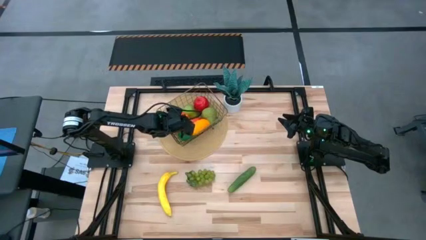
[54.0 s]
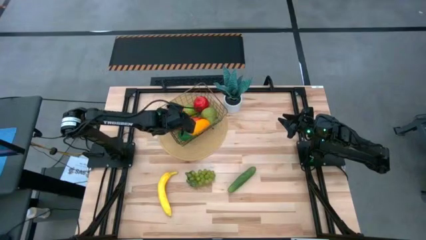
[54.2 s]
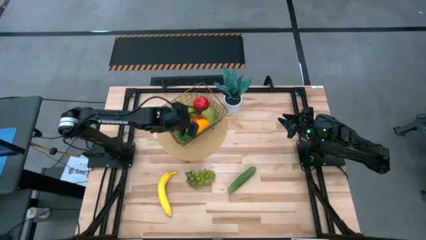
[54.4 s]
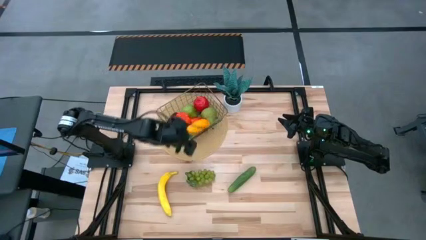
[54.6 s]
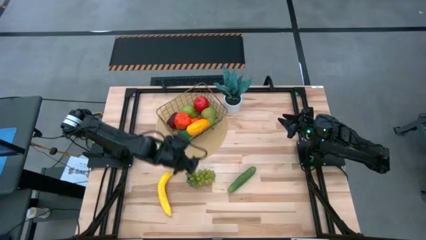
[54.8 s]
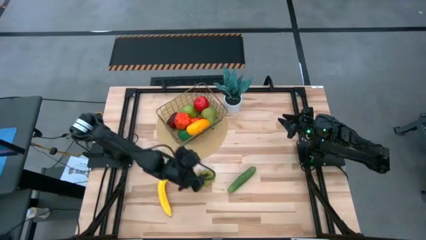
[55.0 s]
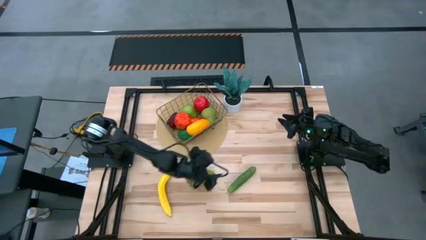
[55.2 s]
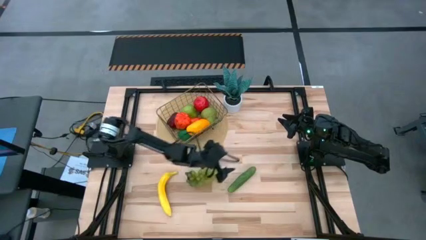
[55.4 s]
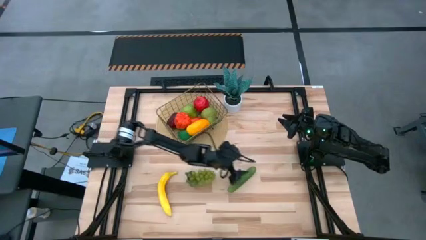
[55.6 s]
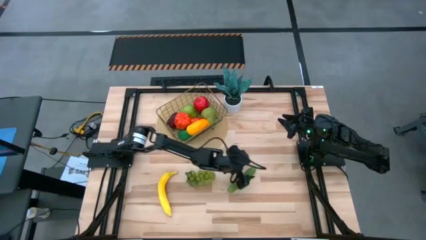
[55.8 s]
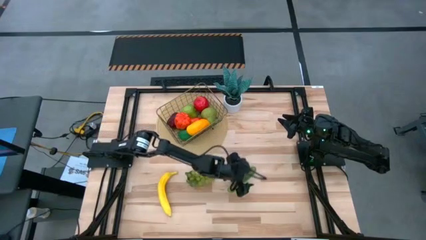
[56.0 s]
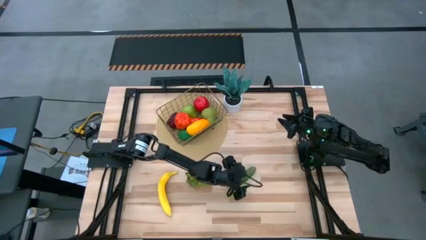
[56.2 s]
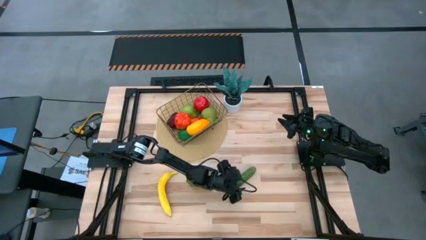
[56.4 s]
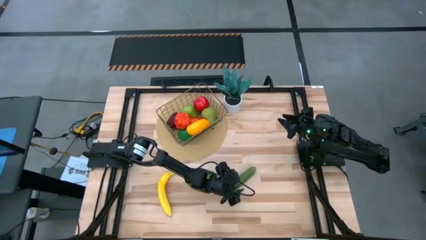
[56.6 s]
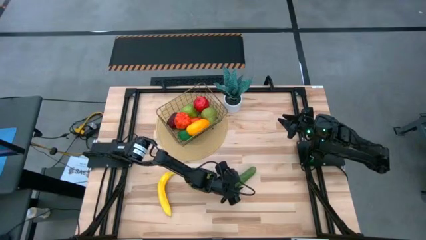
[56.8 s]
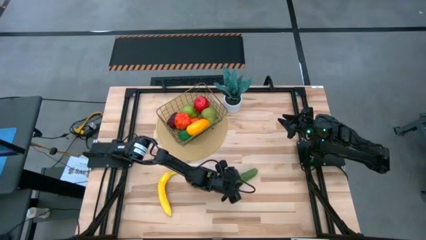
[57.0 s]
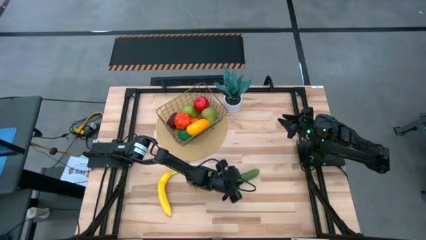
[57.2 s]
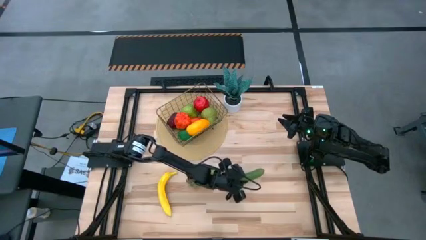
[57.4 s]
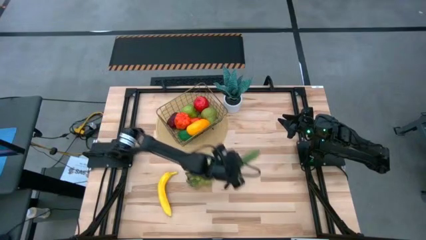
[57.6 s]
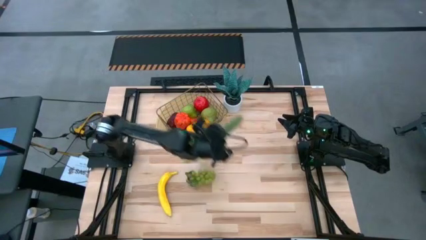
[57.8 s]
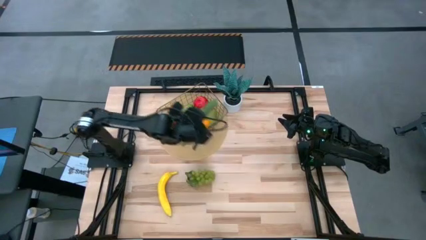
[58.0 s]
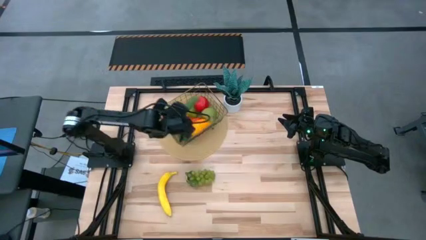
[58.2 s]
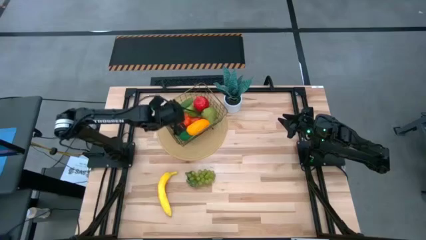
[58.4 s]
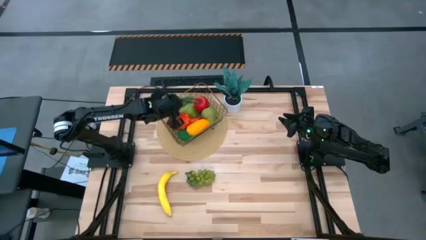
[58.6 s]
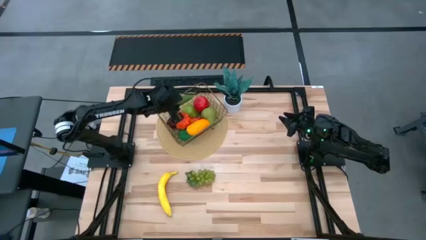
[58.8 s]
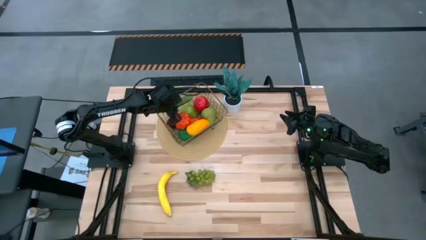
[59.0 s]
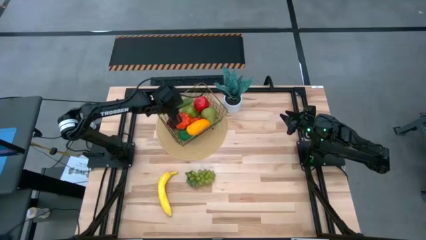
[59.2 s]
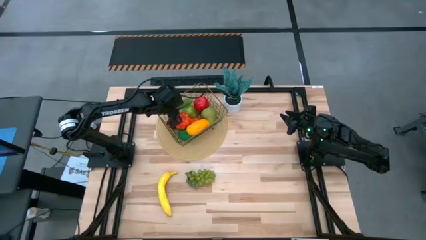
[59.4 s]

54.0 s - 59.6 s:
Task: Build produce basket
Put the cucumber into the wire basket

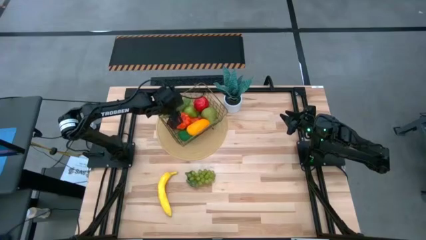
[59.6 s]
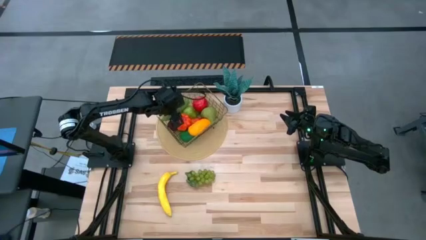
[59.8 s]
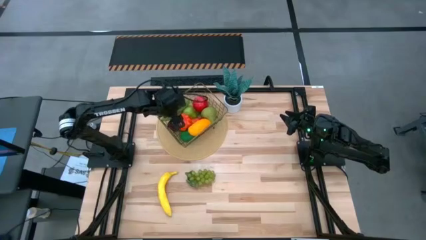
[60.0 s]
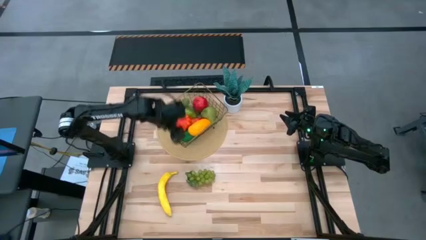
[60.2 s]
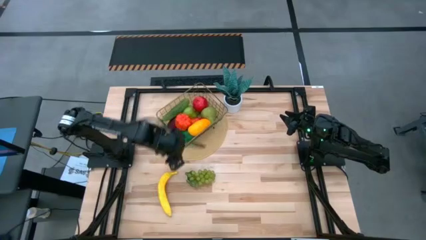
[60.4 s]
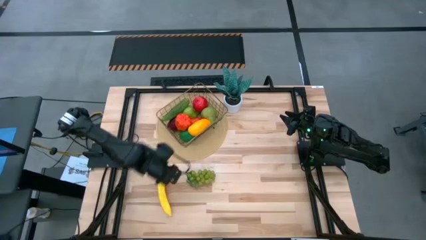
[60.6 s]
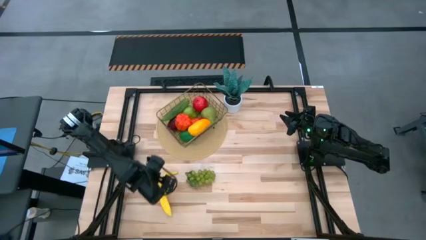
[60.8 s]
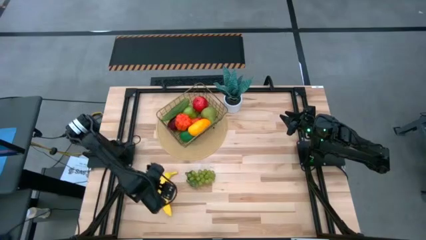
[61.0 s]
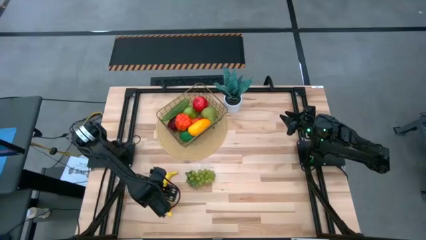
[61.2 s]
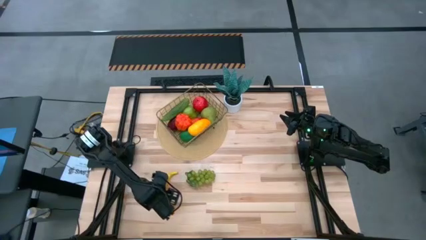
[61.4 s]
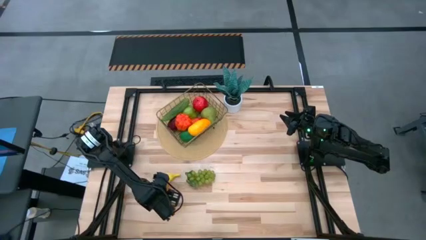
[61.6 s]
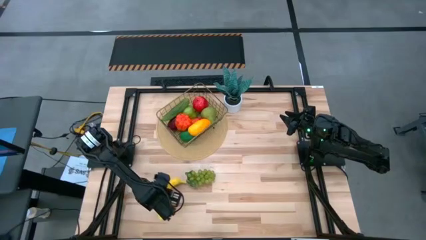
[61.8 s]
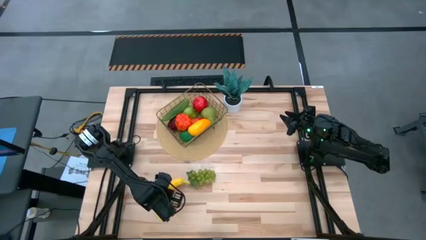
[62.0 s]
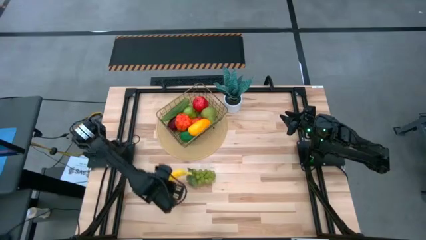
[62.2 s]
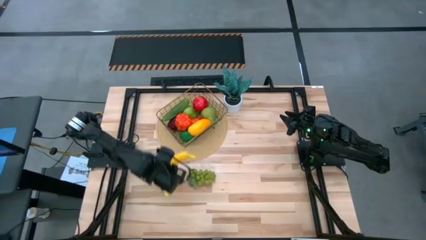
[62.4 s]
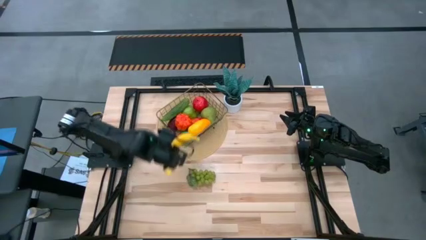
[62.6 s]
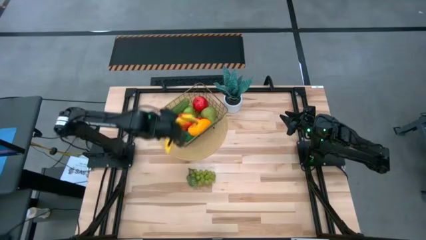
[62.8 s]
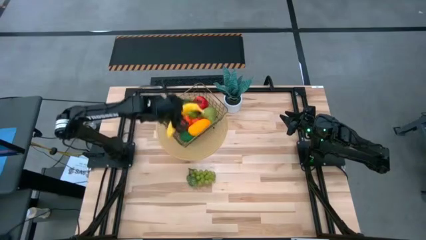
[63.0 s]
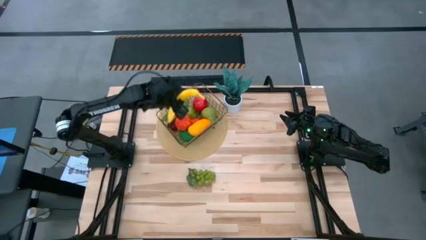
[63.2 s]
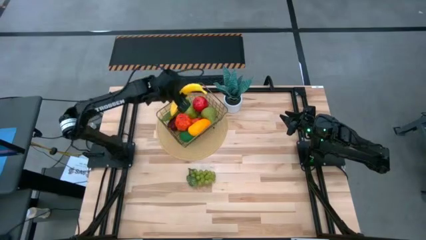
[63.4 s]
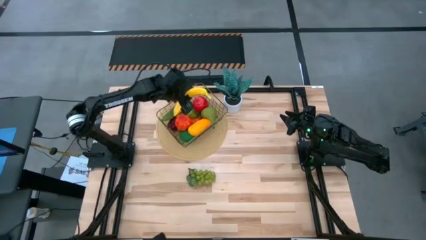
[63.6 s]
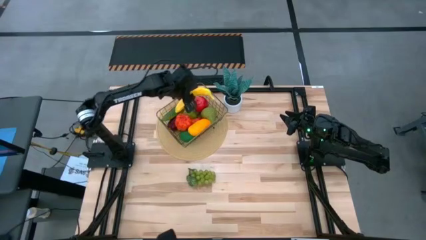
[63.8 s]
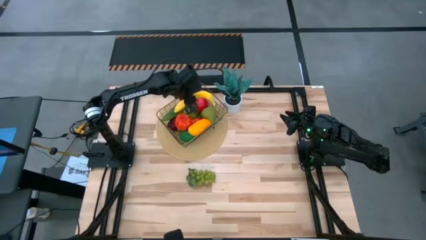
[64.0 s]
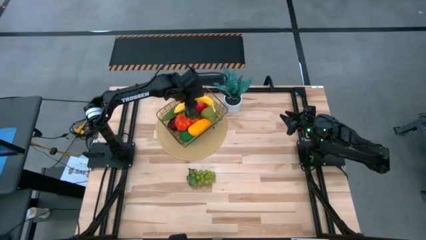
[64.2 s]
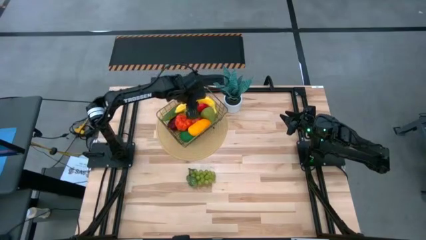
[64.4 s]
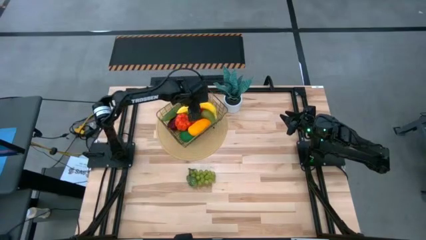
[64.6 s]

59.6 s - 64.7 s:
Put the banana into the wire basket

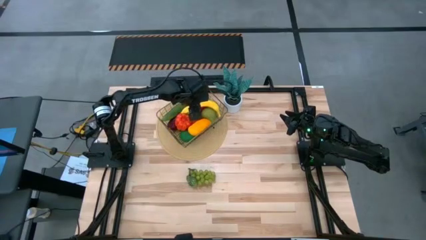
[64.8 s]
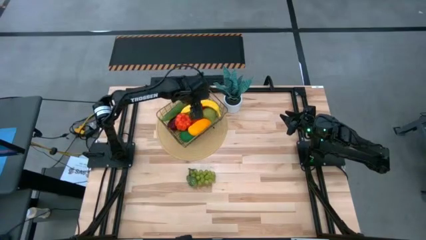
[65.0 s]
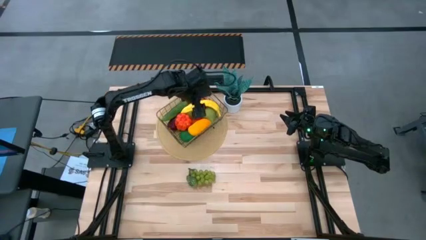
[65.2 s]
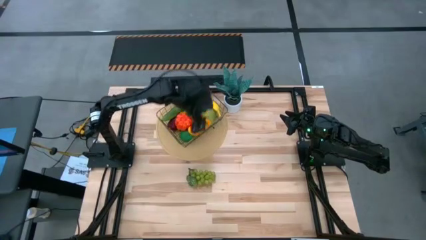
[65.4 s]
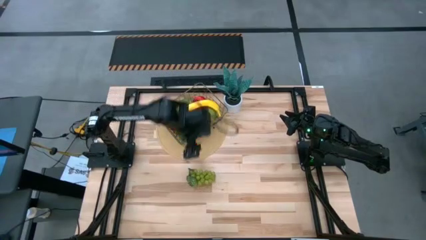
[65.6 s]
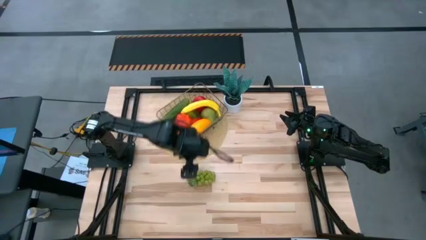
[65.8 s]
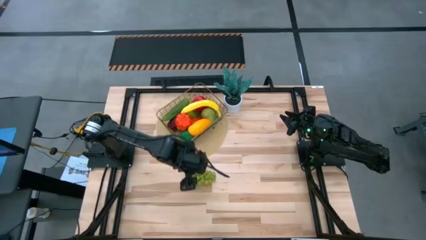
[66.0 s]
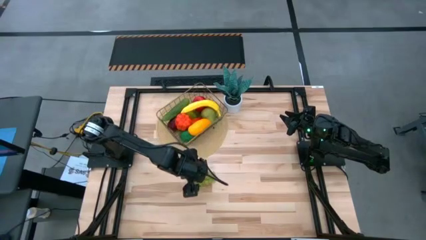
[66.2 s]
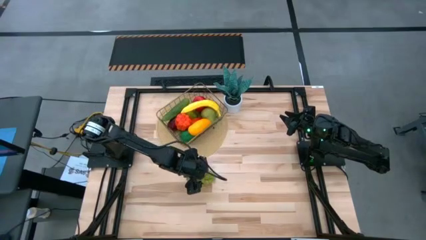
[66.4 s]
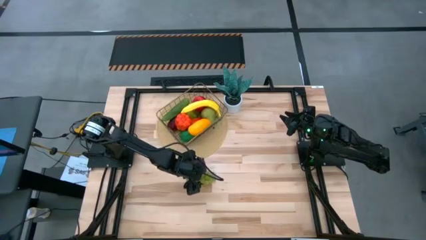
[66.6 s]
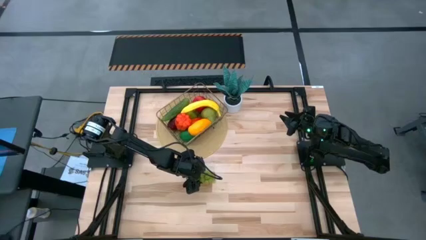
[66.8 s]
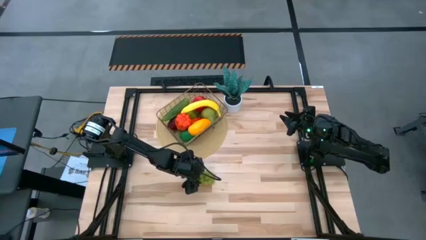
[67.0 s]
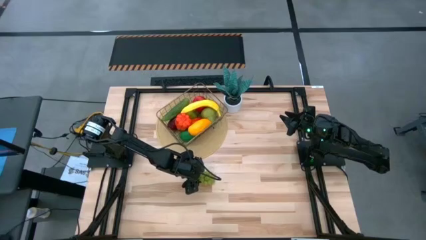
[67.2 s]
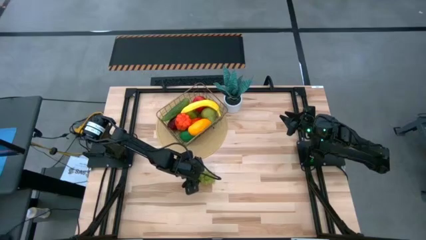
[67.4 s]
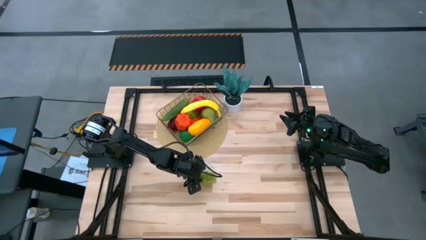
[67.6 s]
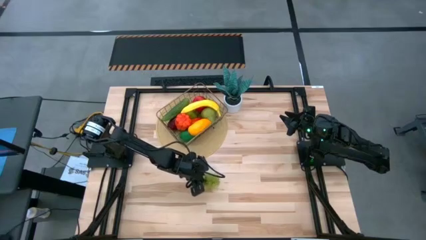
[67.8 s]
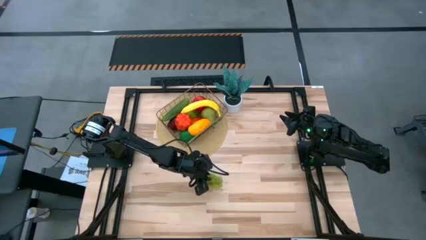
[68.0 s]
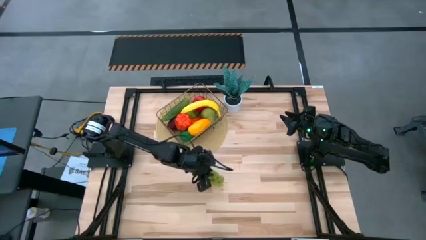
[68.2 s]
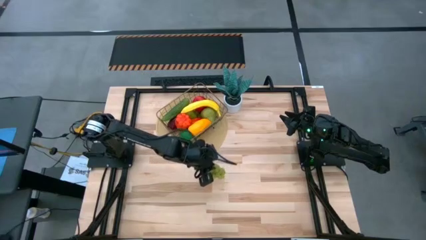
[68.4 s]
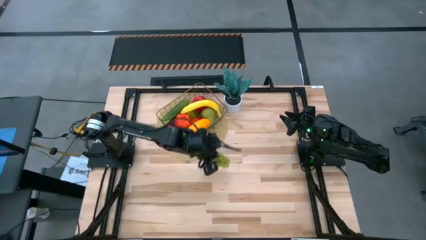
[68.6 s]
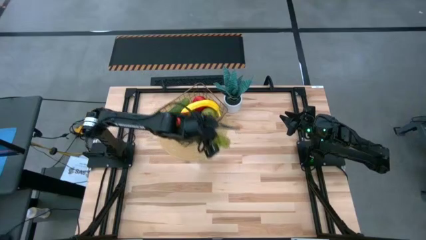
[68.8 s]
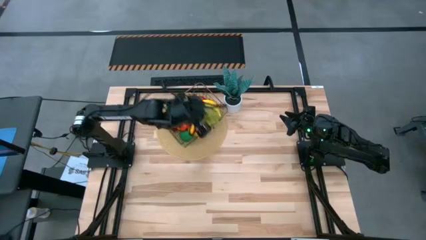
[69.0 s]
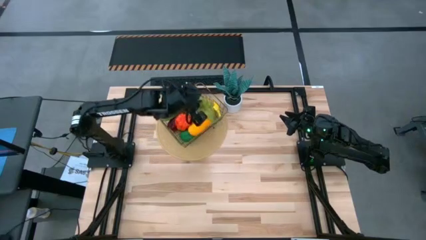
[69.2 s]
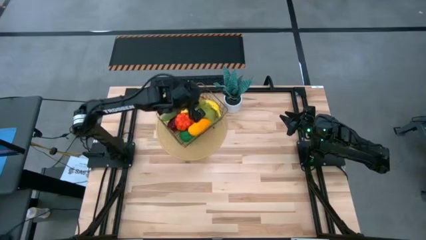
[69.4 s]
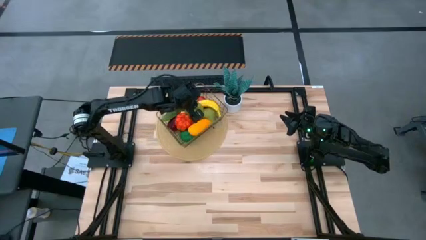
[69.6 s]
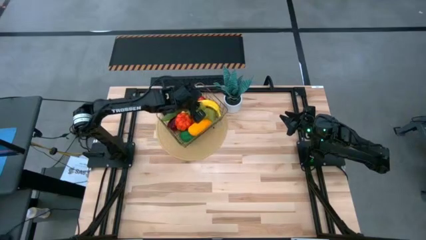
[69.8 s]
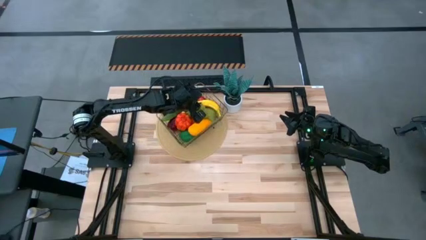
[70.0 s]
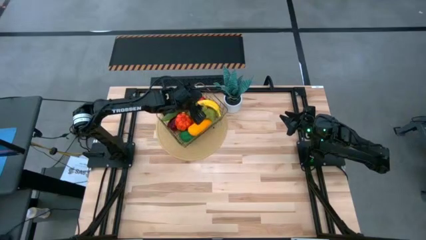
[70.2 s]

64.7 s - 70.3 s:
Put the grapes into the wire basket

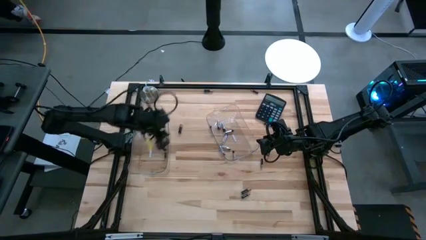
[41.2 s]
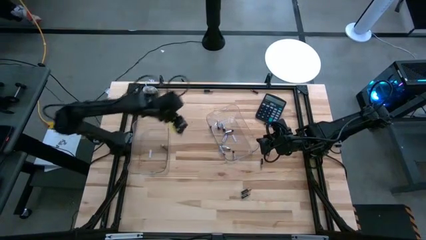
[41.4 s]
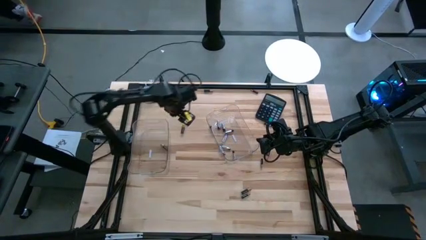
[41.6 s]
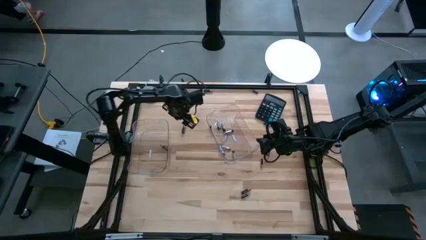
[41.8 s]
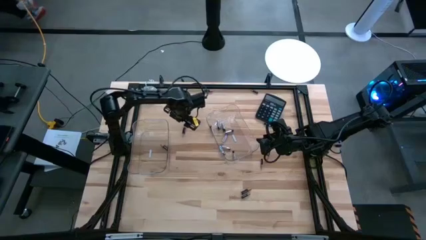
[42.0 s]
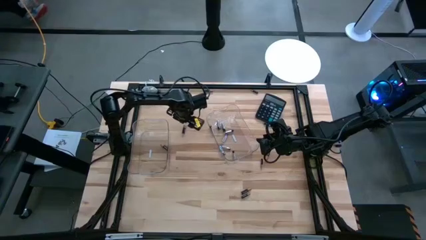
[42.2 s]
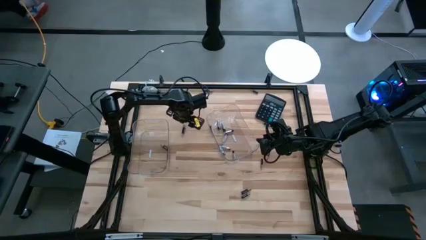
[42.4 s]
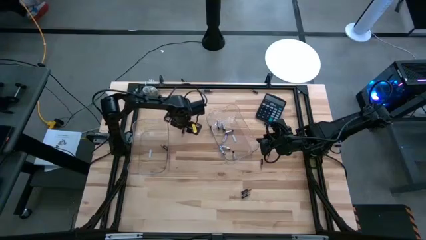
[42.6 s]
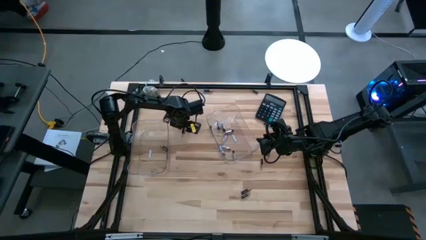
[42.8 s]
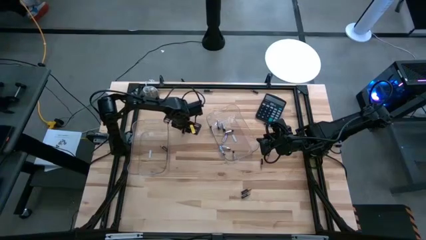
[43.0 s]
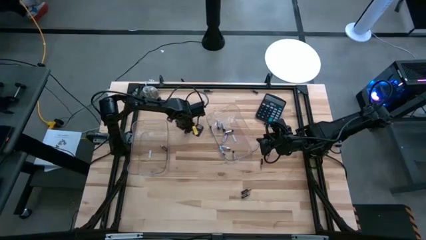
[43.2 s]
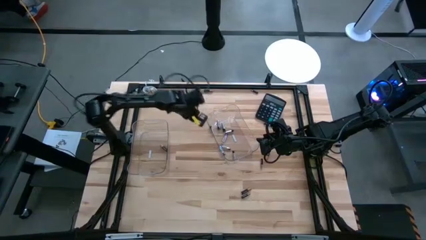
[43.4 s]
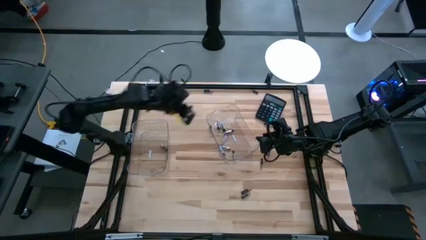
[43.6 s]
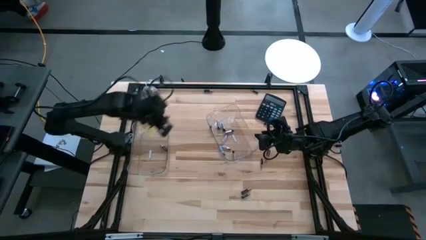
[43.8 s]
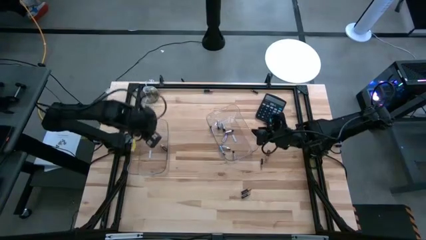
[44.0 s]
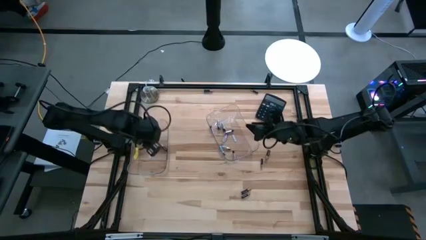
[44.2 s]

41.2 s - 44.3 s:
Task: Sort batteries
Put the black battery into the left transparent bin
